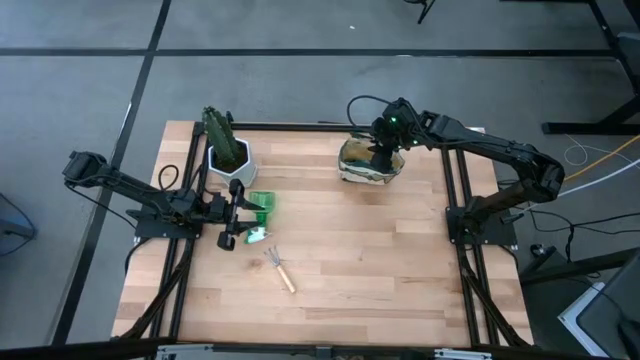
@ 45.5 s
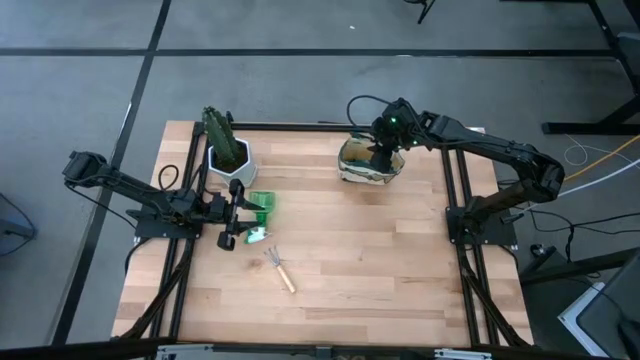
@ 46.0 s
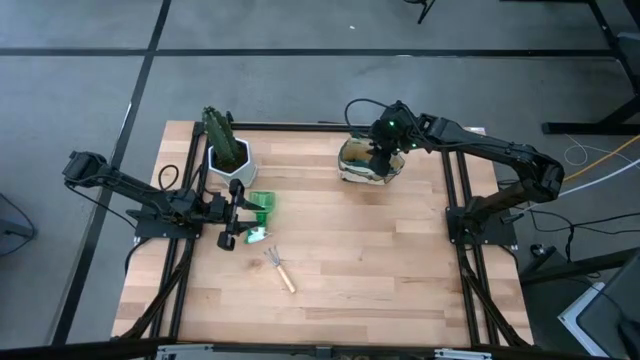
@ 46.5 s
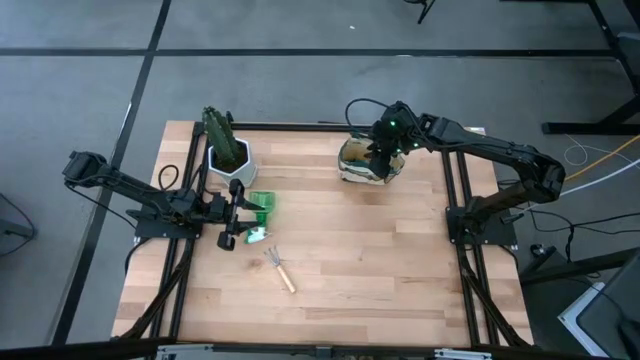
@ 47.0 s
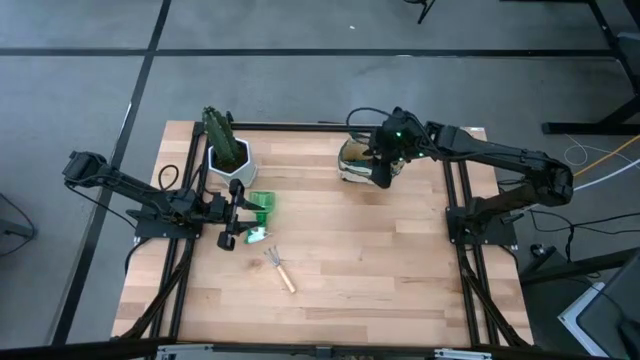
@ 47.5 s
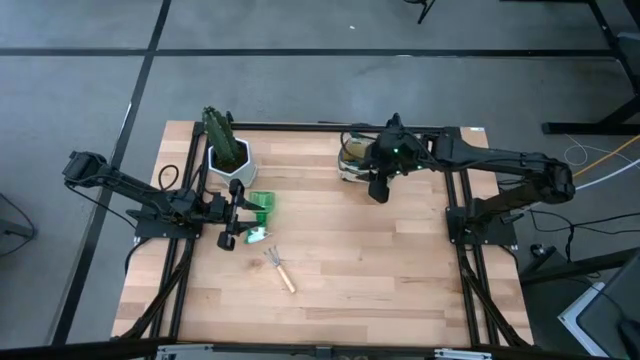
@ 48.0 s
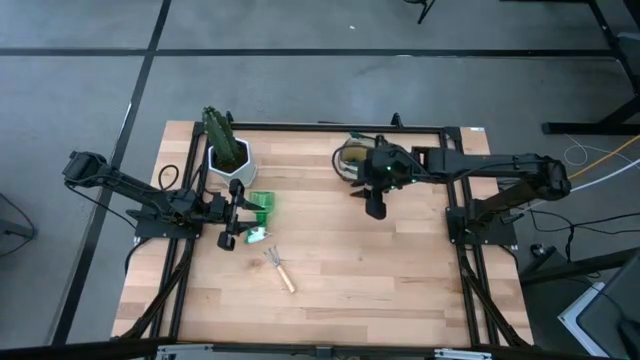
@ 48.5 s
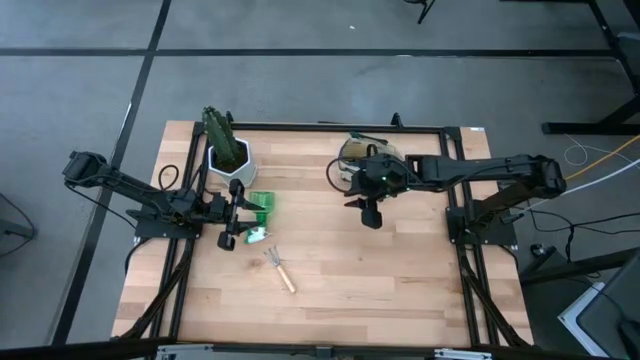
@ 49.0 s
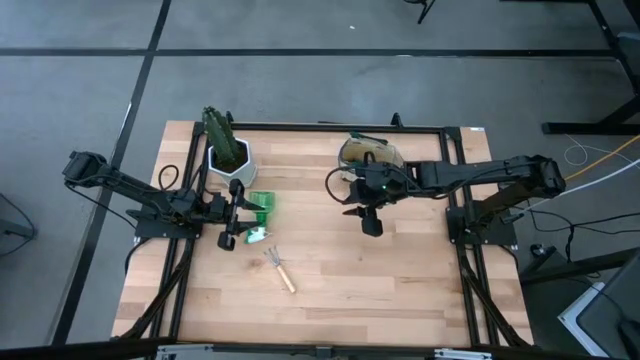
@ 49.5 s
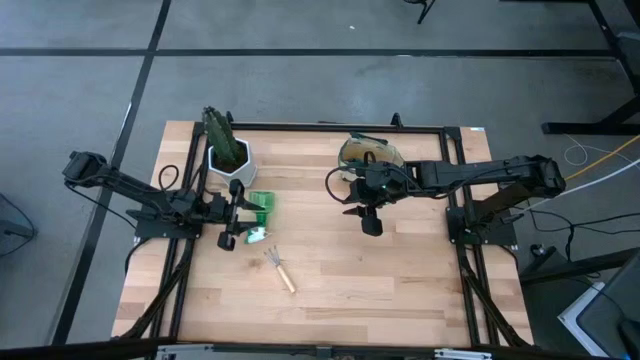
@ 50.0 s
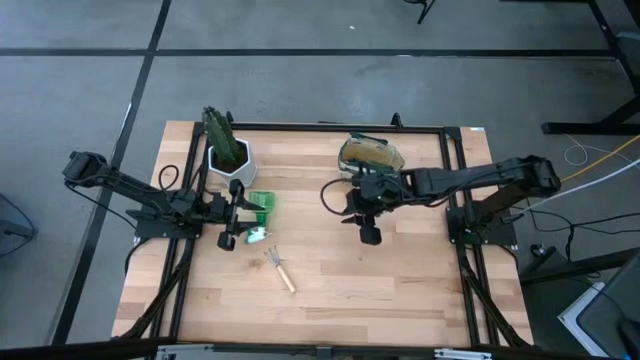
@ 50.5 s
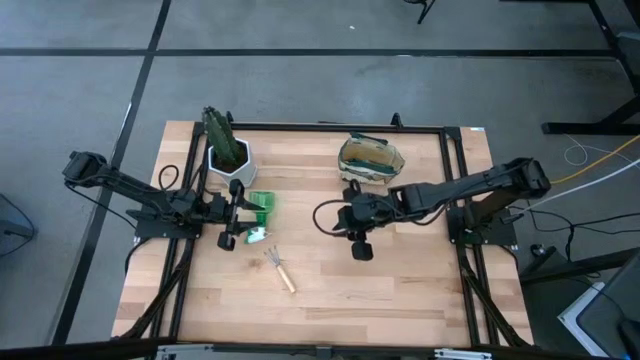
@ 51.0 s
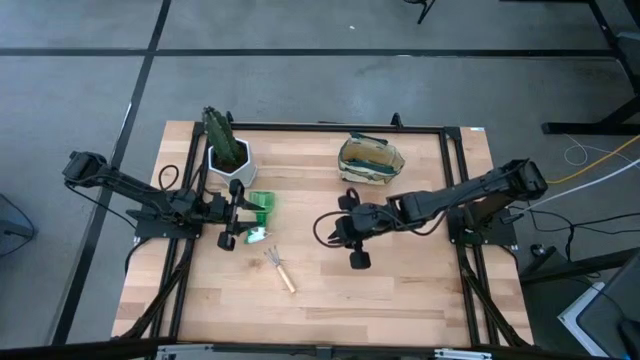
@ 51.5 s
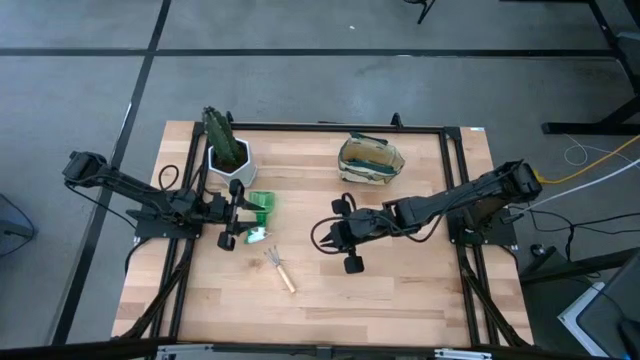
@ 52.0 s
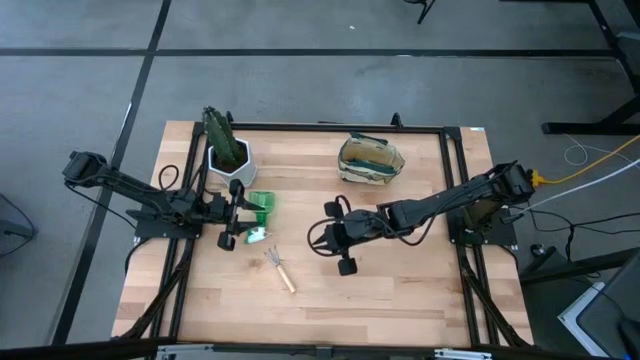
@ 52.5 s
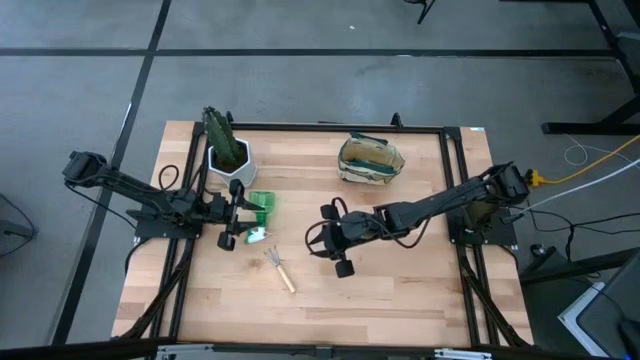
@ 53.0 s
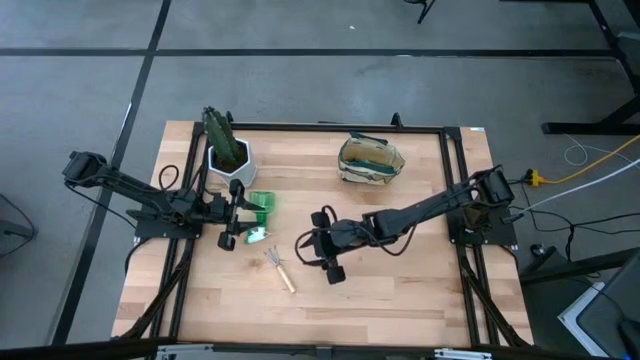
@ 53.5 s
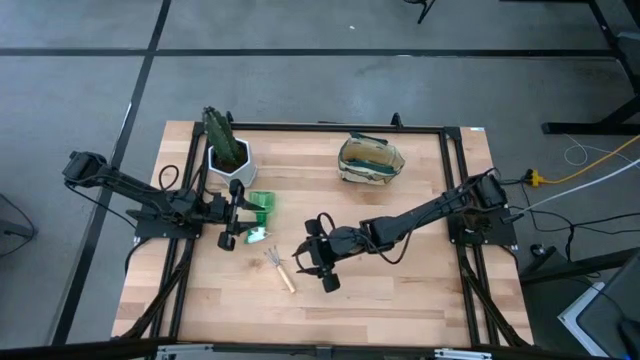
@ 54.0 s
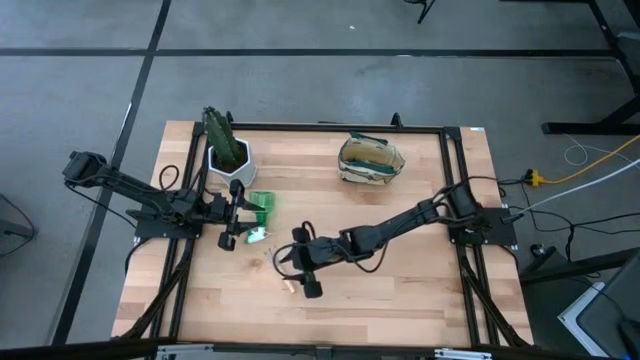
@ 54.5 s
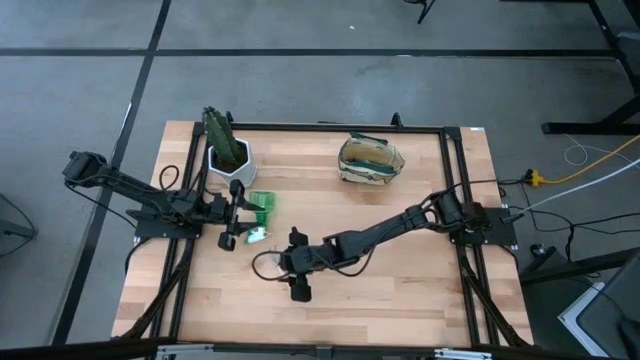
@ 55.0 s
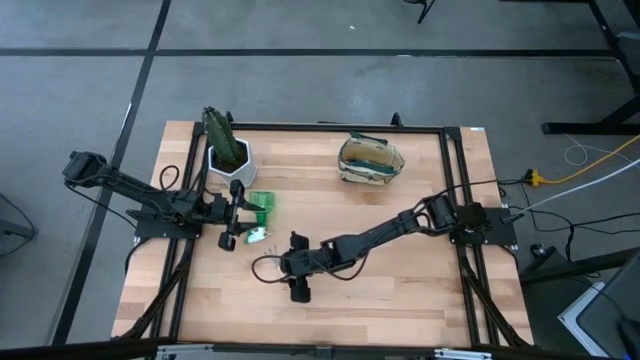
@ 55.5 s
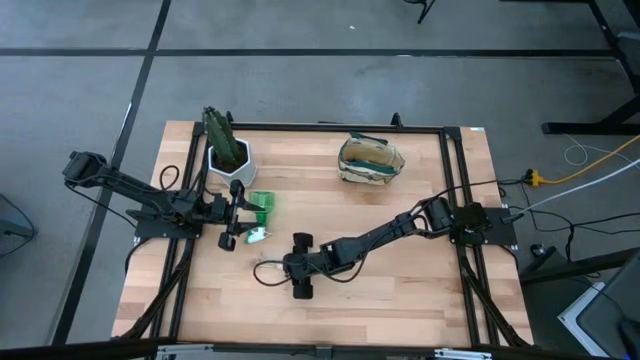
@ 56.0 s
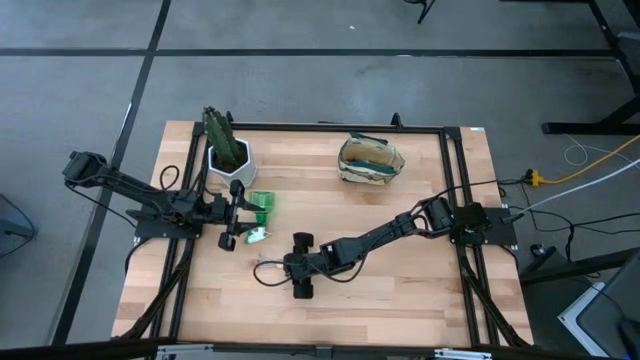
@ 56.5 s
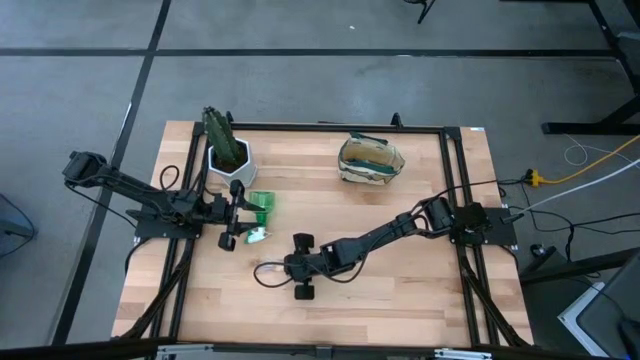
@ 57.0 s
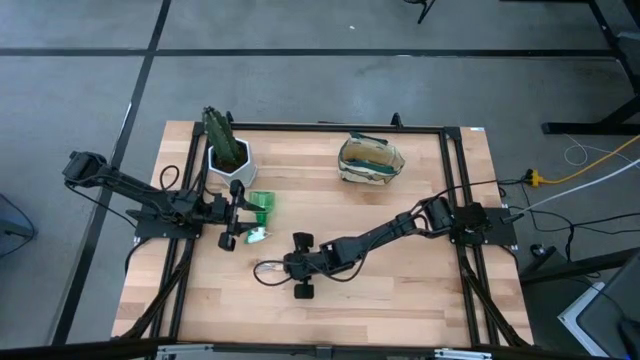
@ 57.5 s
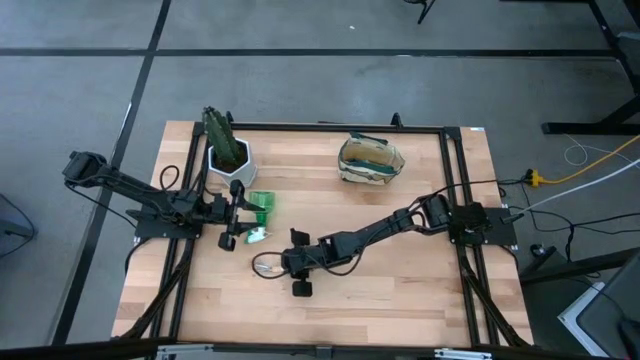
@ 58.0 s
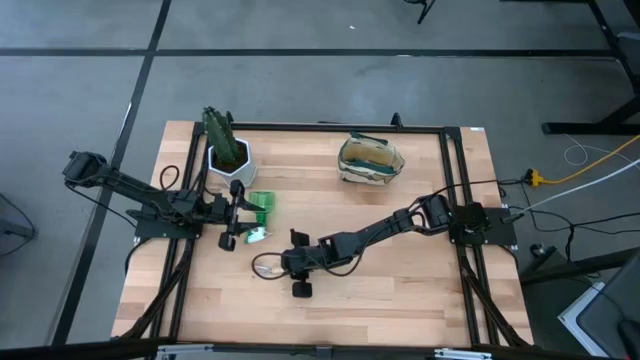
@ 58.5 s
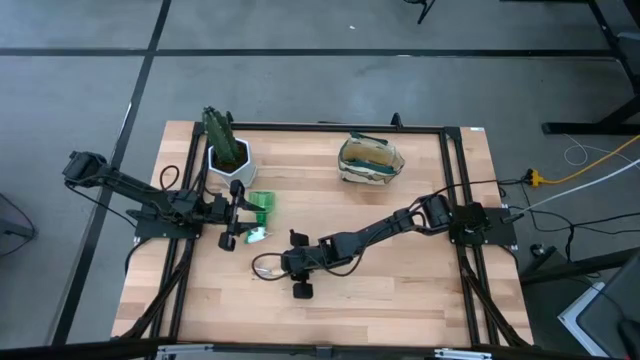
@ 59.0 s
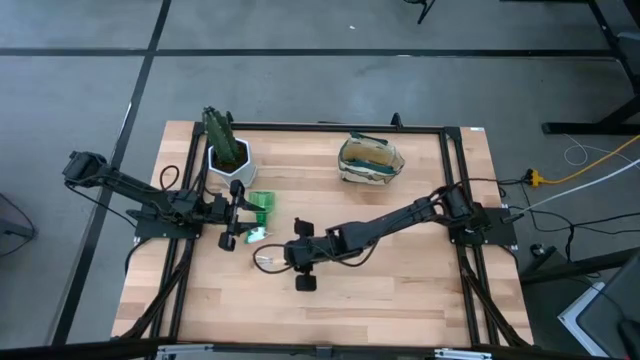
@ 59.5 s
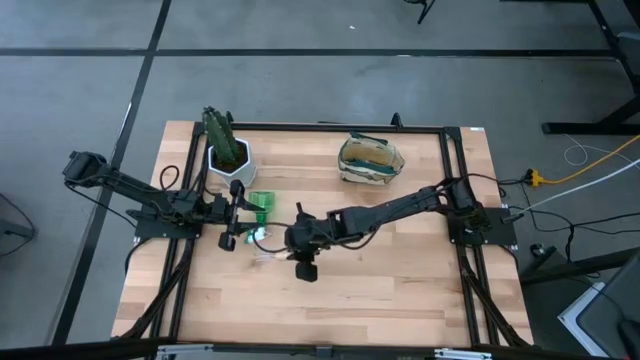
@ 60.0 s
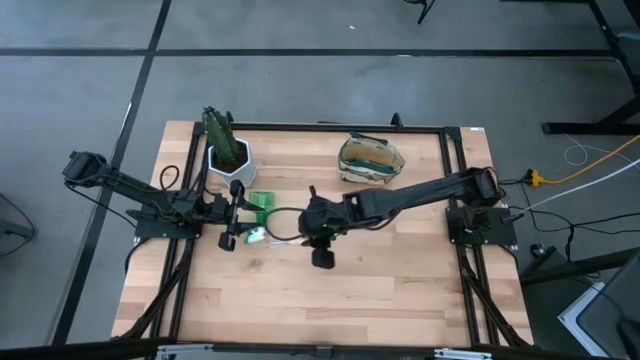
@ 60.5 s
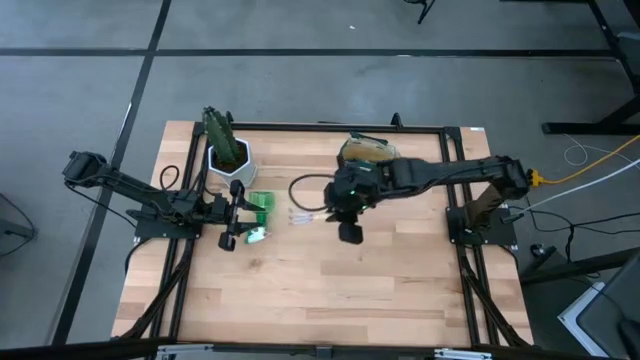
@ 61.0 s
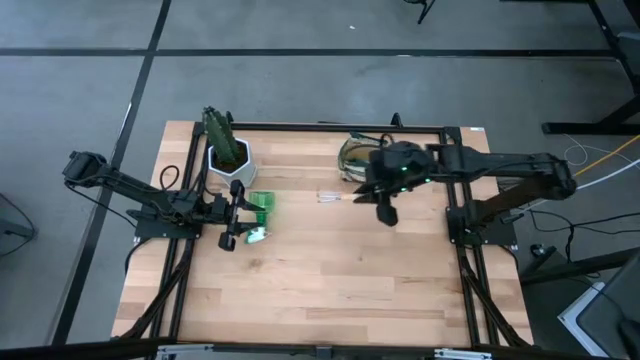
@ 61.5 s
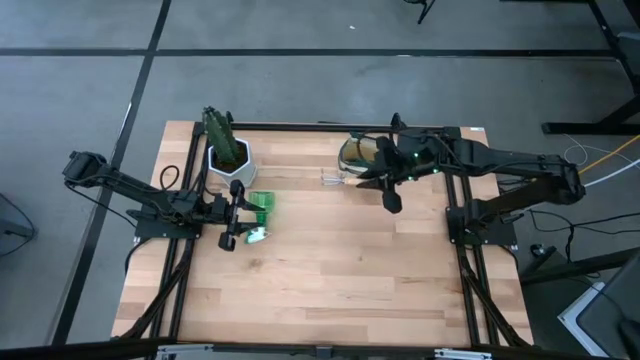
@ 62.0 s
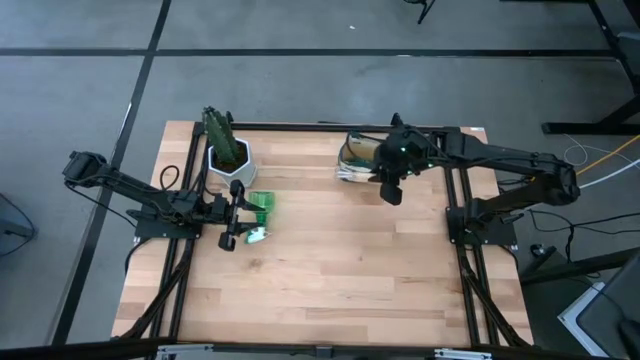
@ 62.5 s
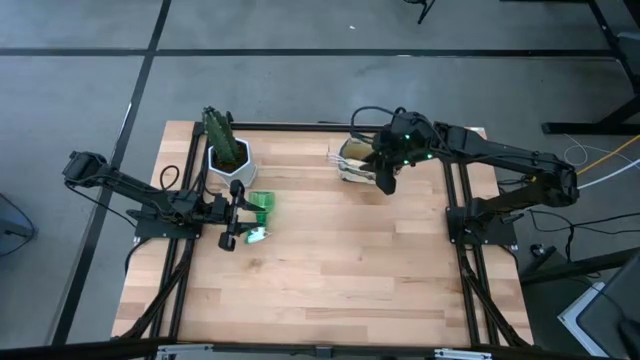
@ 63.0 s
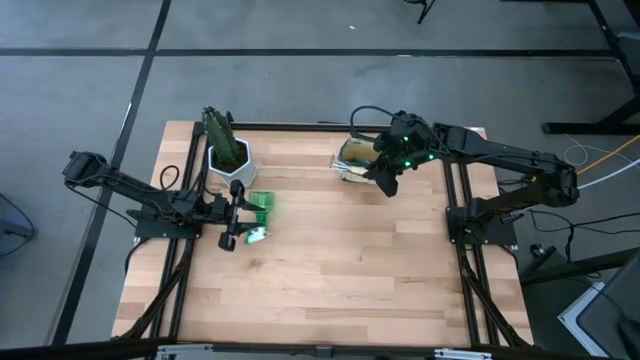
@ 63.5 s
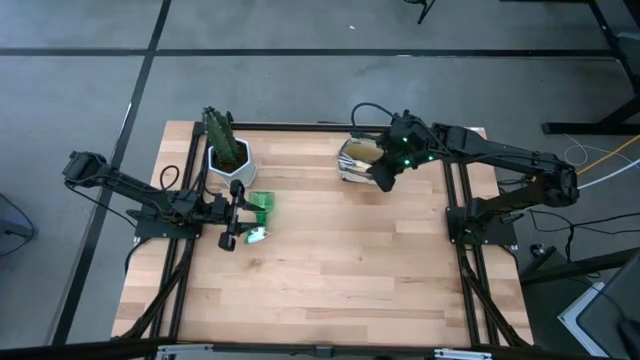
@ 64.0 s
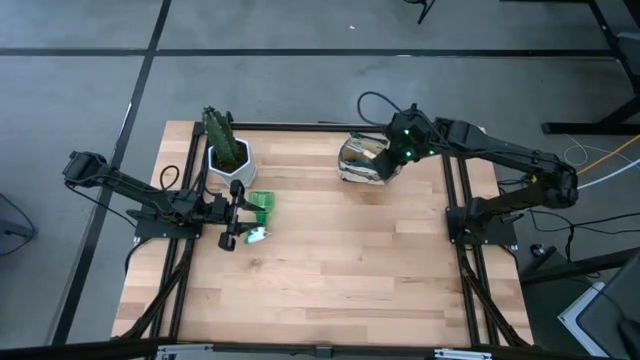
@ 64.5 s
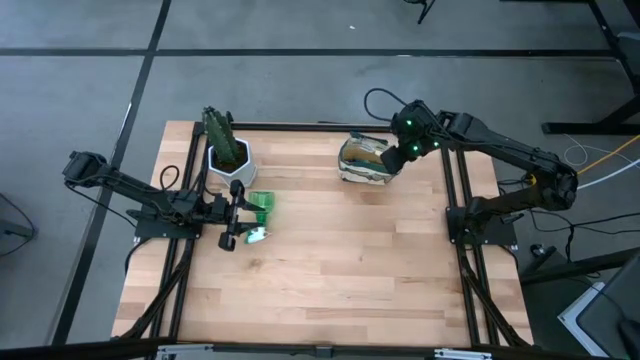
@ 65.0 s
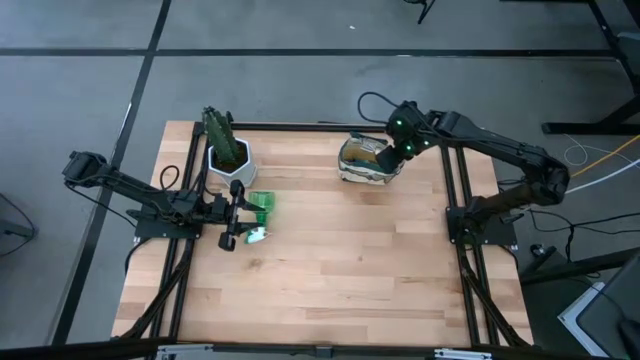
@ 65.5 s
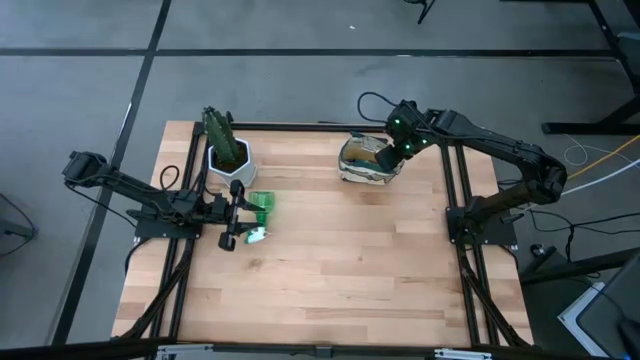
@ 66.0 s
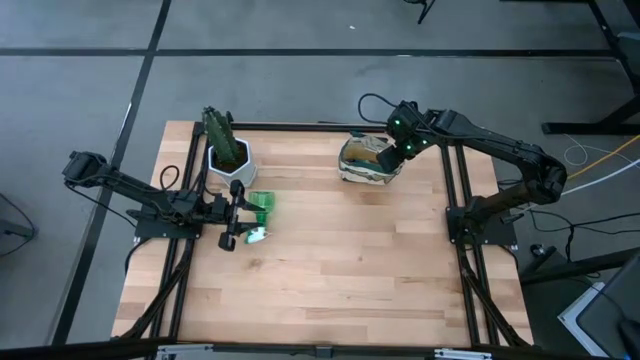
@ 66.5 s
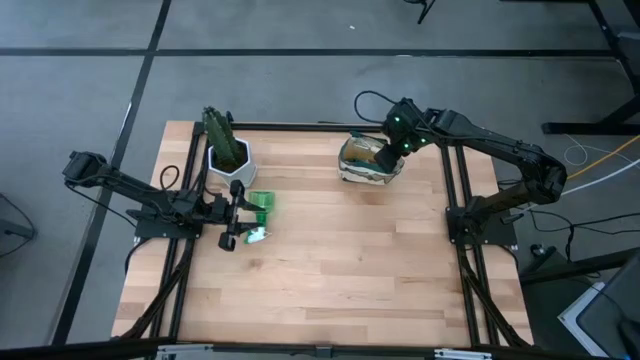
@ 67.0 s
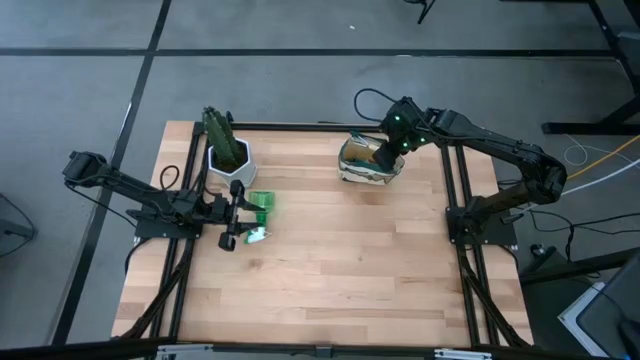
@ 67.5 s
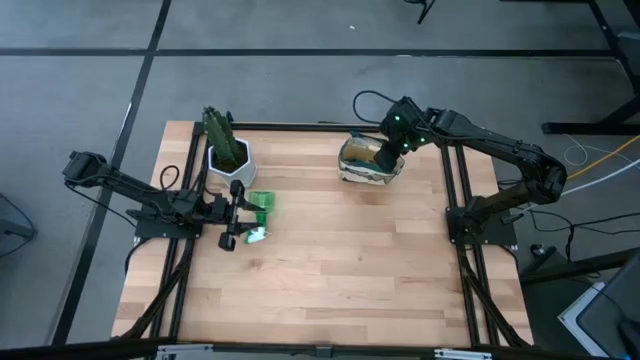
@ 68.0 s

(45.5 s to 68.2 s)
Task: Pick & Place Garden tools in Gardening bag
Put the brown hand rake into the brown gardening bag
